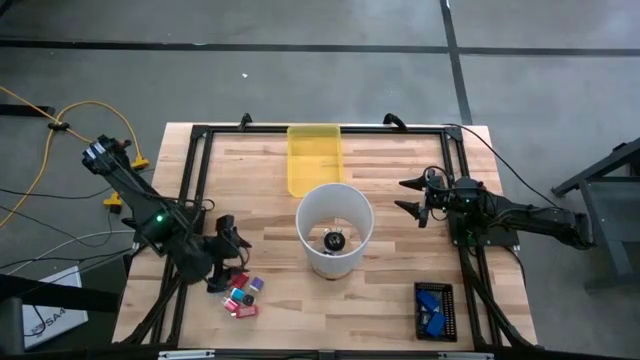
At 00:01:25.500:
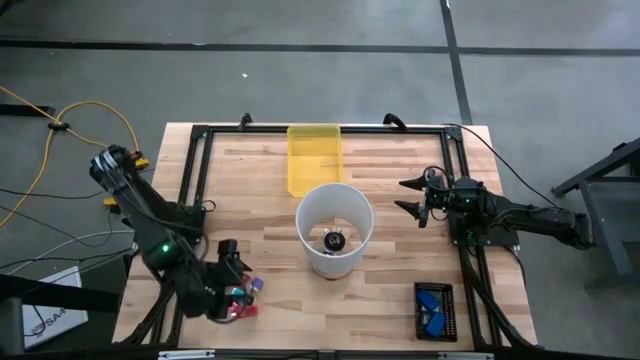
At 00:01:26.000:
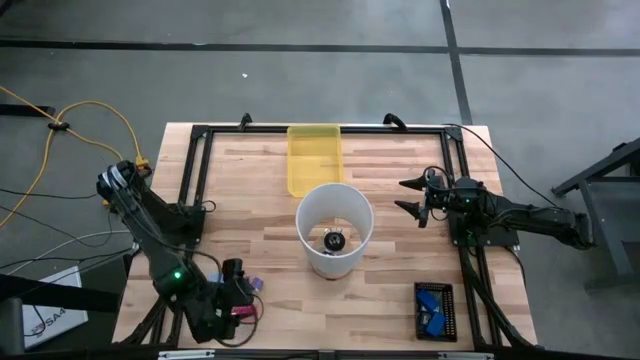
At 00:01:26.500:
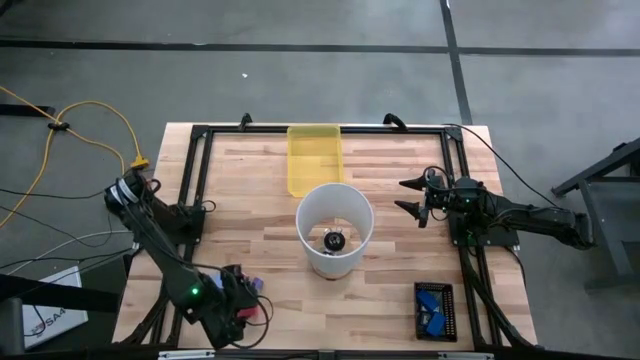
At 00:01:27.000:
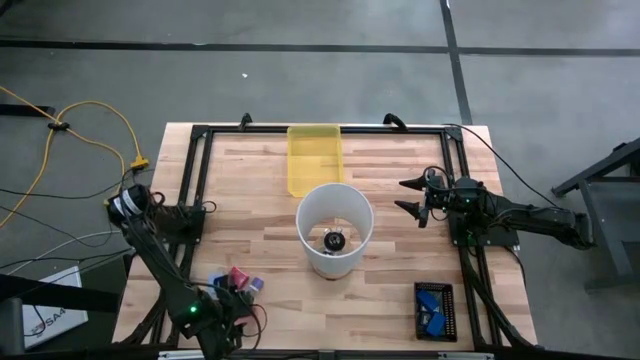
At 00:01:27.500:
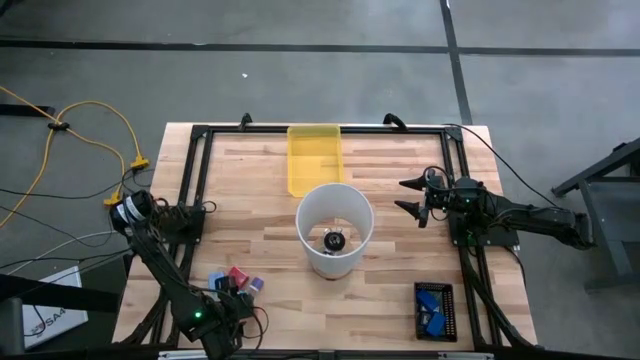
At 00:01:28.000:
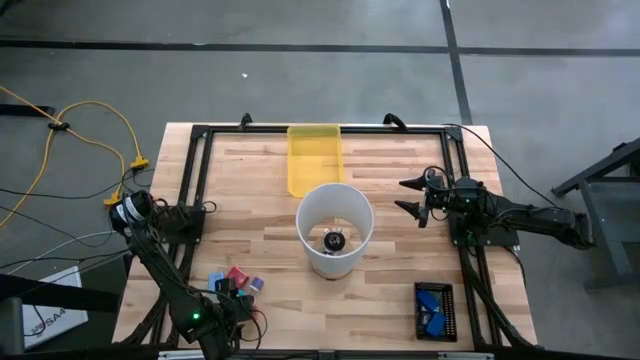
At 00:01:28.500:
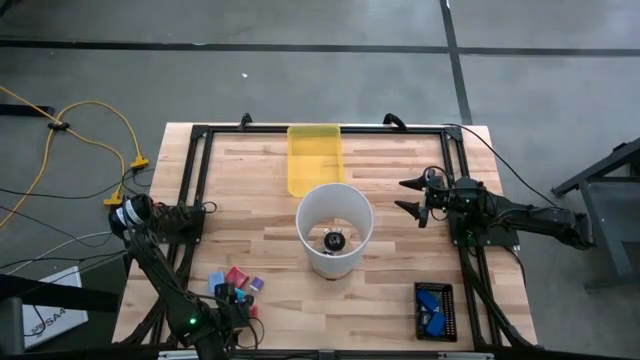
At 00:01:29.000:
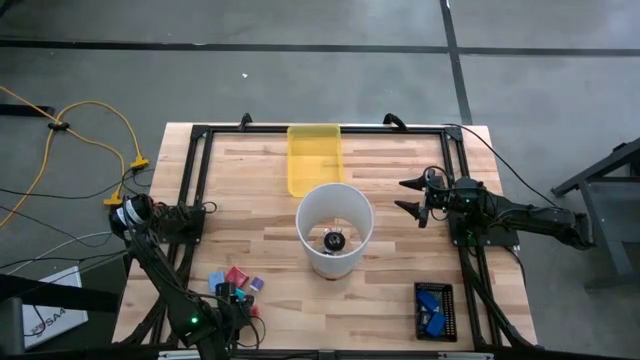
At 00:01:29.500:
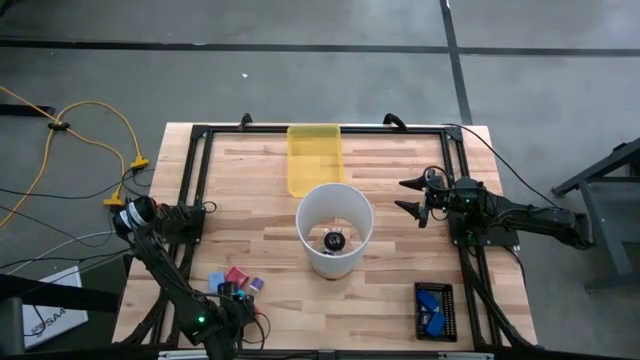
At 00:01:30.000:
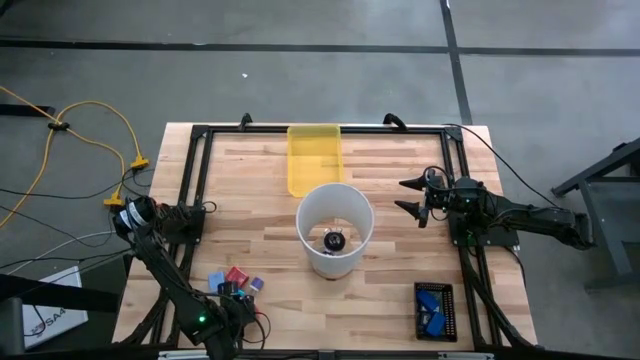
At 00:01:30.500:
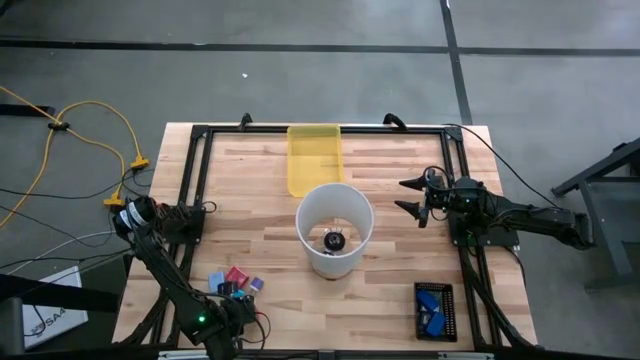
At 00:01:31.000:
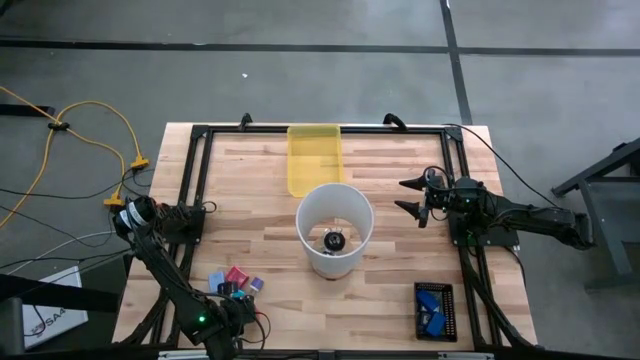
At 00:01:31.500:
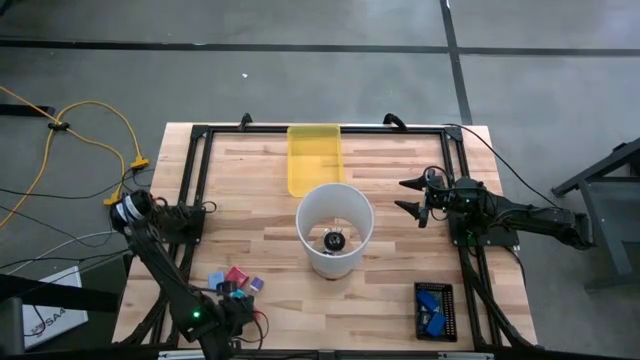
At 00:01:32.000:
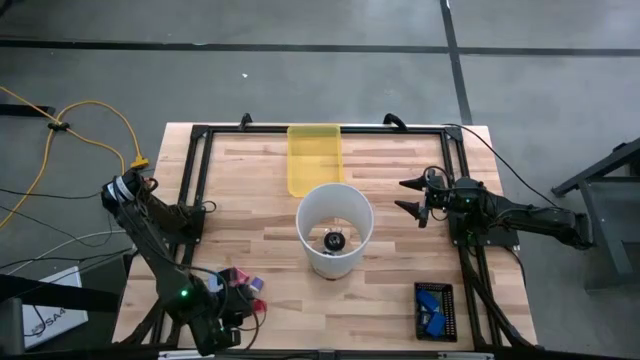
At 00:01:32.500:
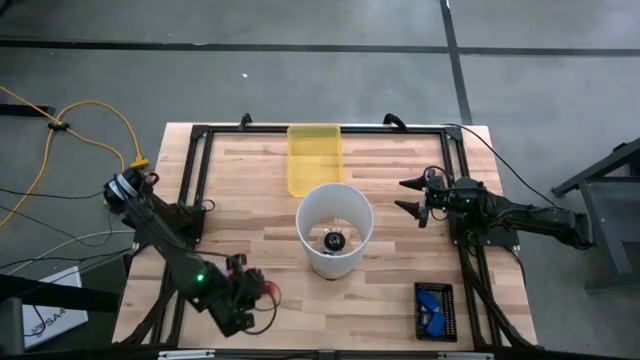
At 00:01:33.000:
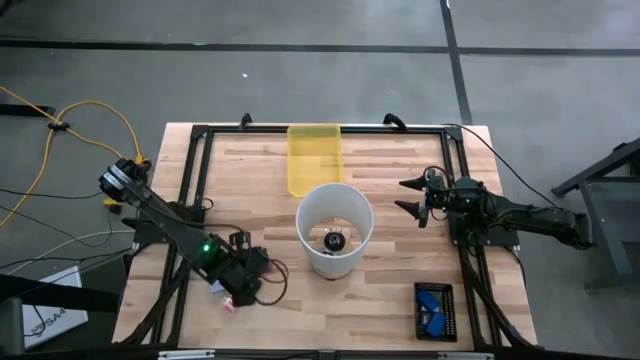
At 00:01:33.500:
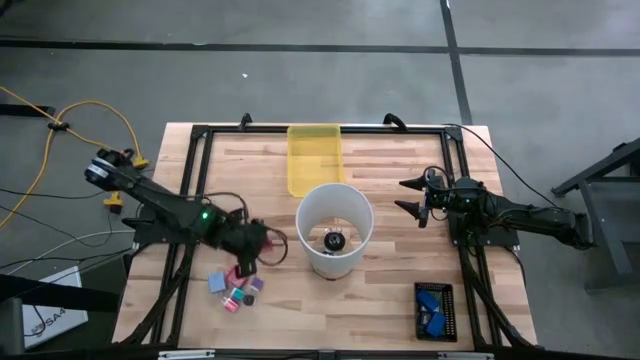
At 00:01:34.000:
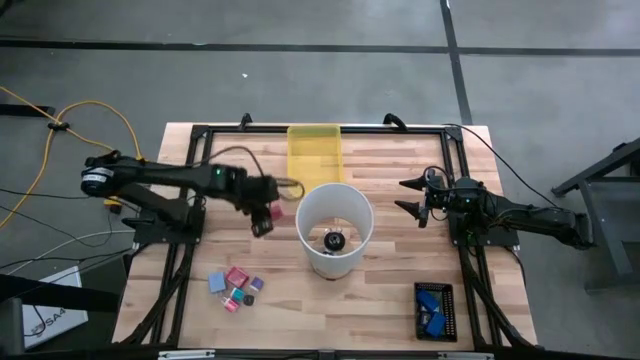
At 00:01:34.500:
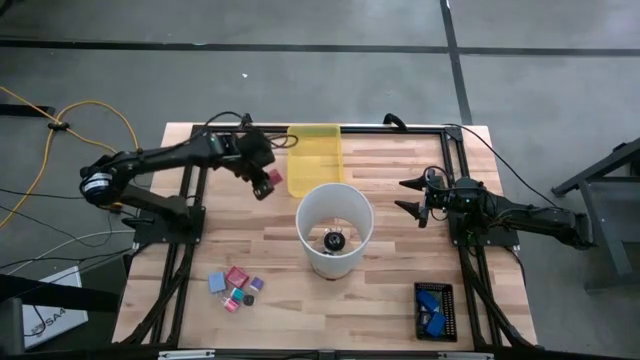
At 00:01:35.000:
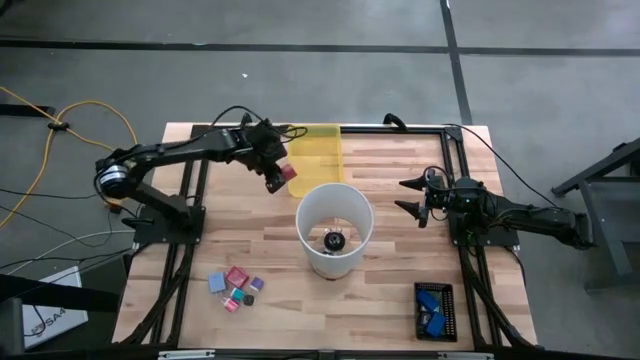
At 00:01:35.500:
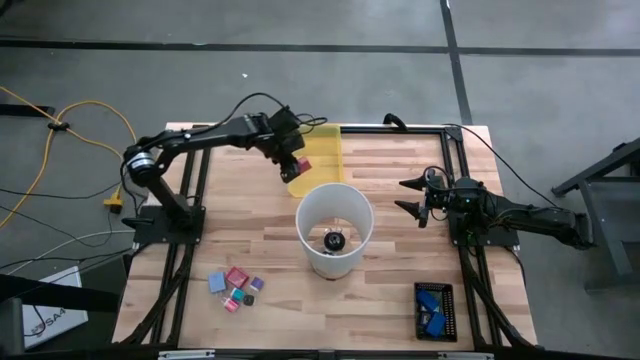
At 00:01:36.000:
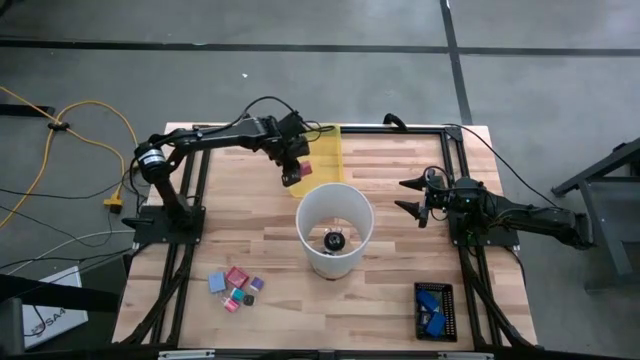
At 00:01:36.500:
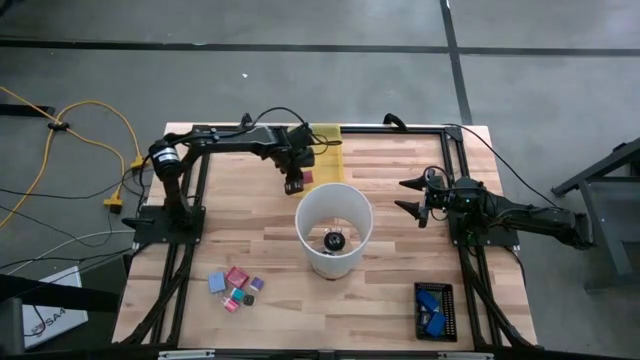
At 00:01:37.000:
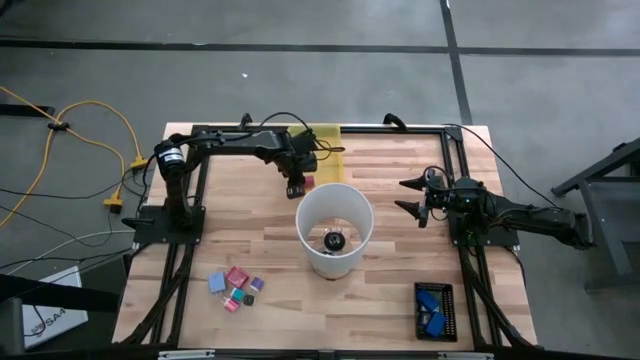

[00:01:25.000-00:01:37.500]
Task: Pick & Place Office items
Put the bottom red charger adapter into the yellow bin
